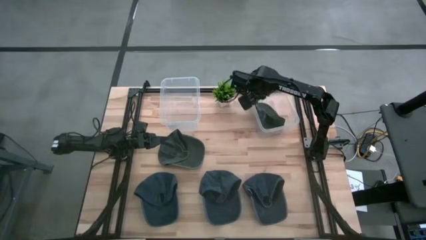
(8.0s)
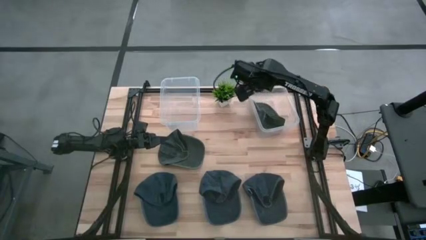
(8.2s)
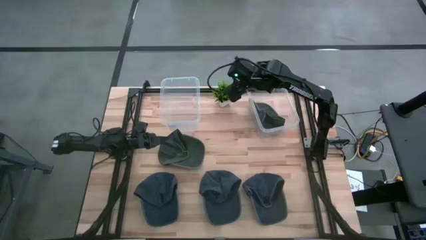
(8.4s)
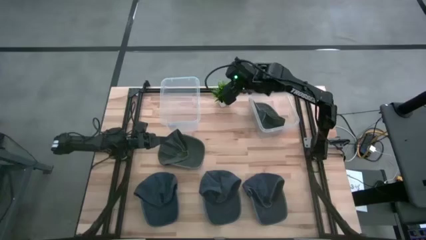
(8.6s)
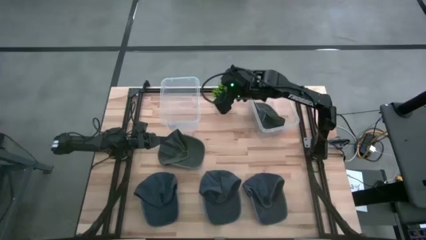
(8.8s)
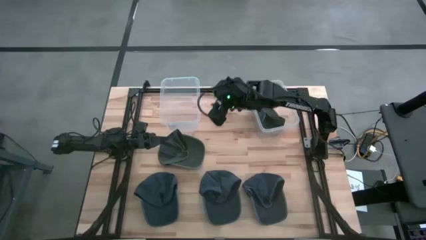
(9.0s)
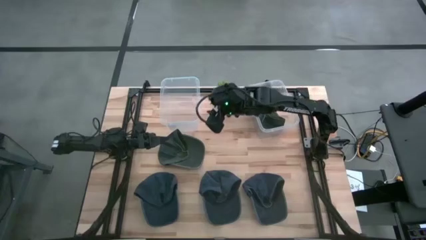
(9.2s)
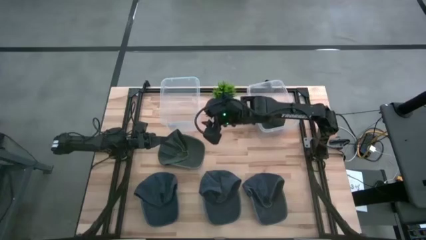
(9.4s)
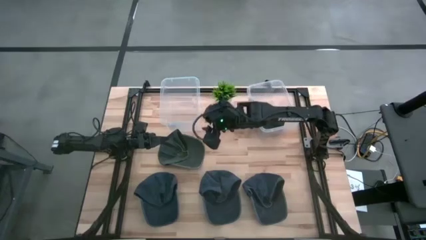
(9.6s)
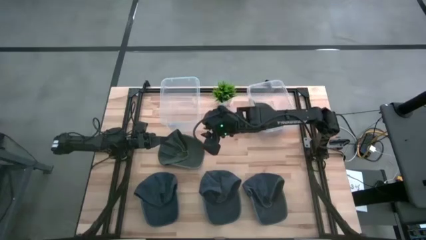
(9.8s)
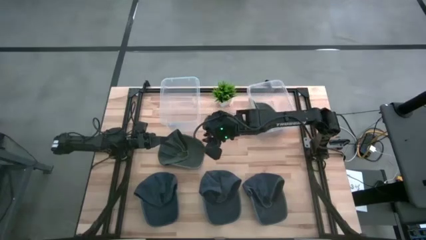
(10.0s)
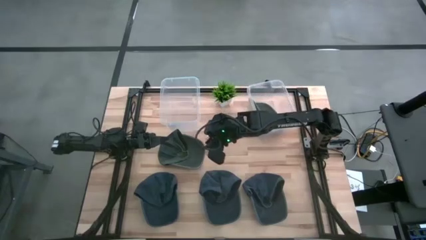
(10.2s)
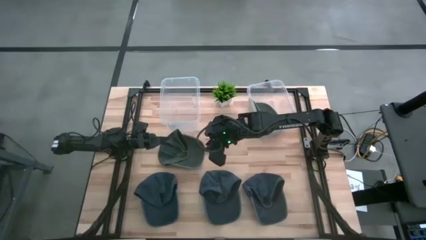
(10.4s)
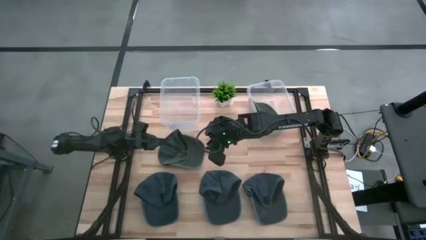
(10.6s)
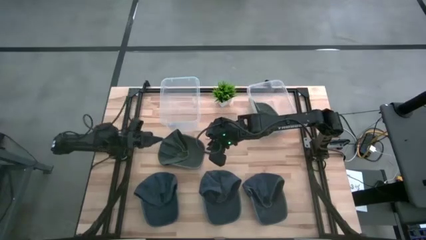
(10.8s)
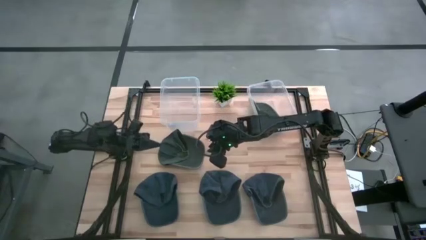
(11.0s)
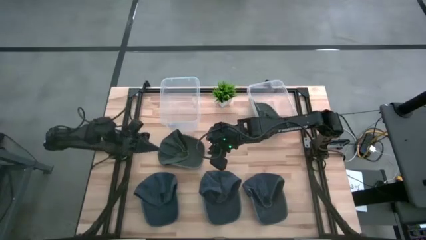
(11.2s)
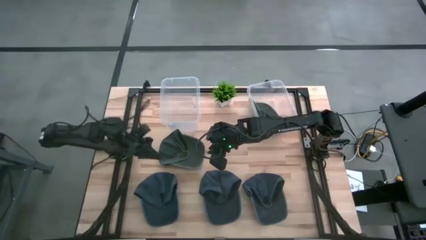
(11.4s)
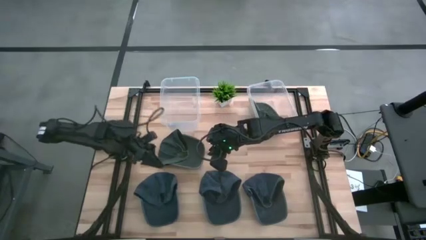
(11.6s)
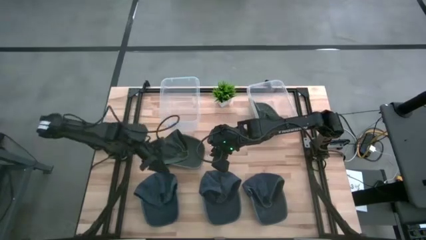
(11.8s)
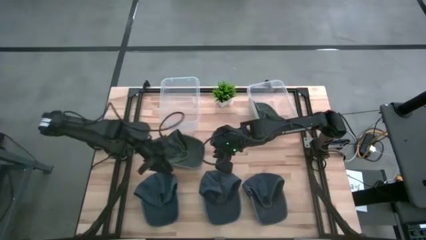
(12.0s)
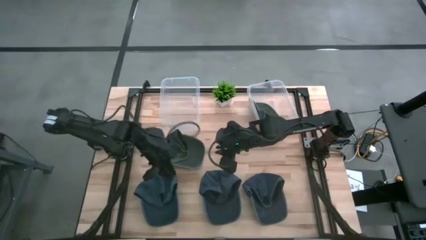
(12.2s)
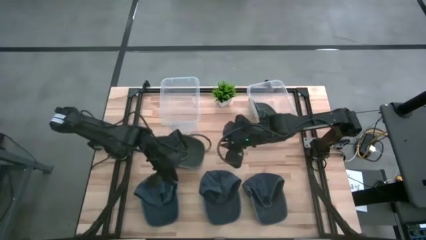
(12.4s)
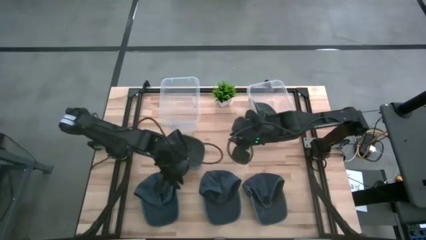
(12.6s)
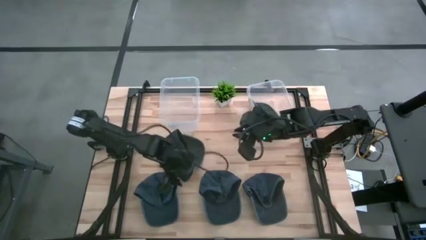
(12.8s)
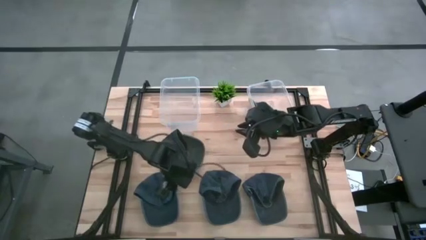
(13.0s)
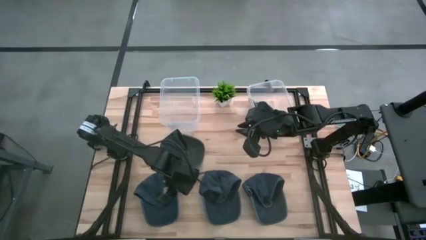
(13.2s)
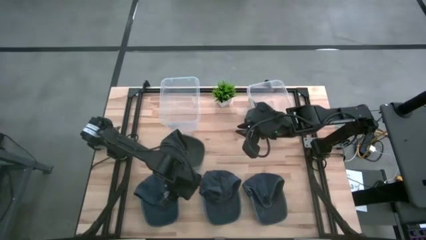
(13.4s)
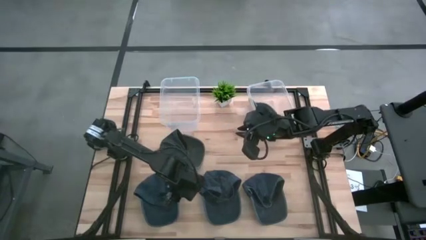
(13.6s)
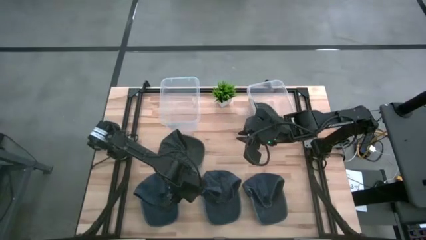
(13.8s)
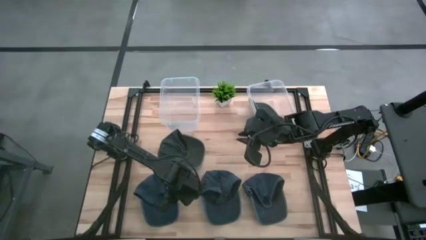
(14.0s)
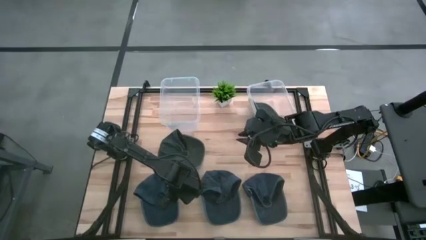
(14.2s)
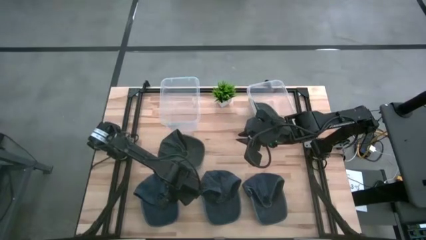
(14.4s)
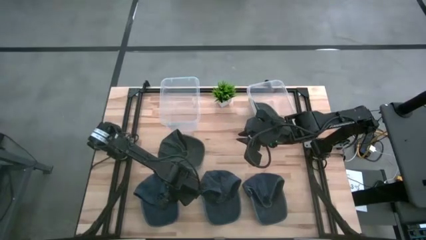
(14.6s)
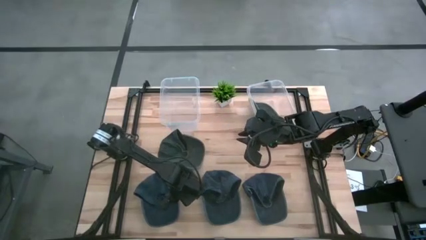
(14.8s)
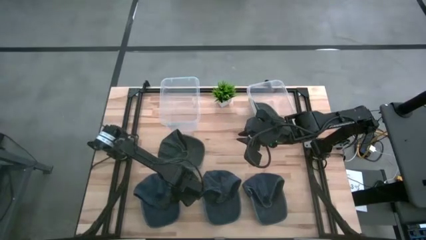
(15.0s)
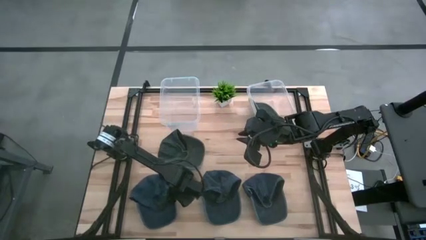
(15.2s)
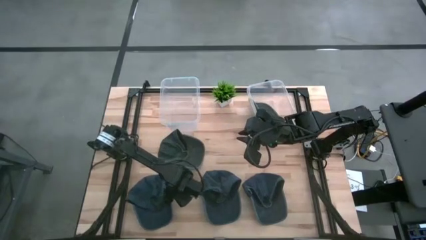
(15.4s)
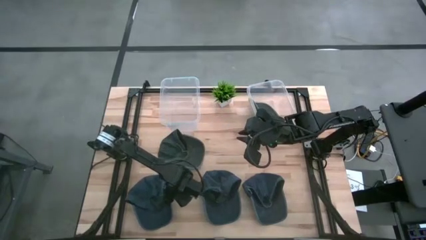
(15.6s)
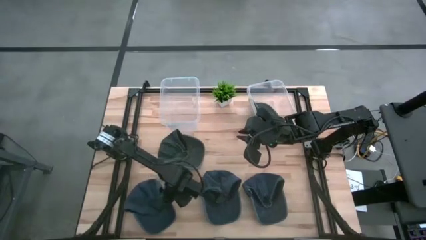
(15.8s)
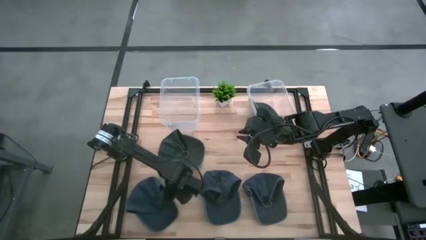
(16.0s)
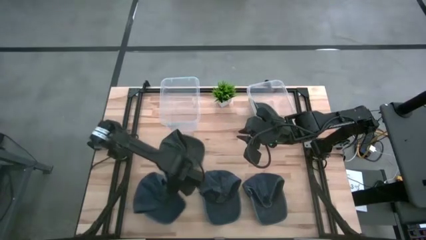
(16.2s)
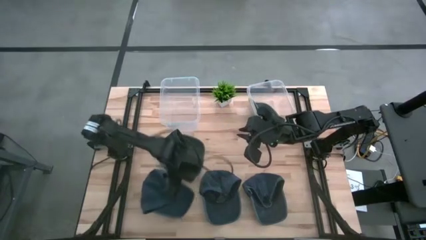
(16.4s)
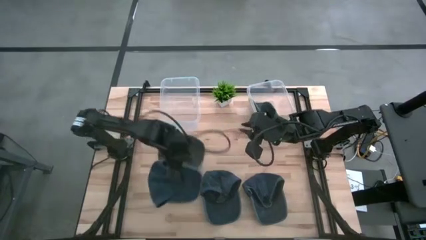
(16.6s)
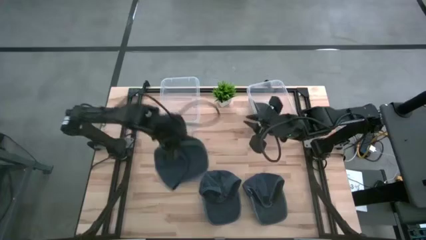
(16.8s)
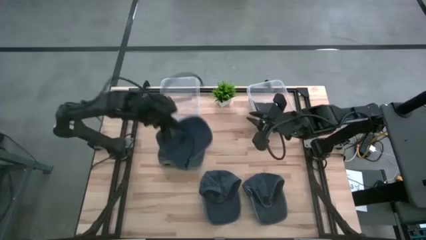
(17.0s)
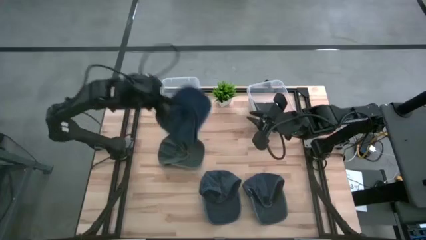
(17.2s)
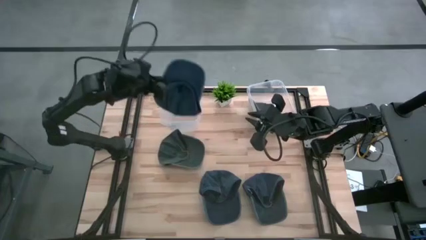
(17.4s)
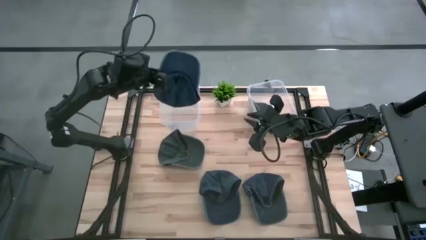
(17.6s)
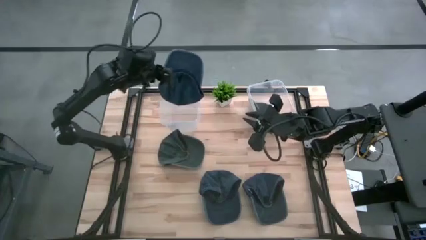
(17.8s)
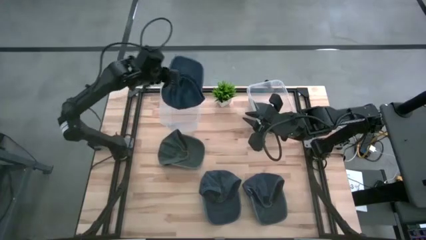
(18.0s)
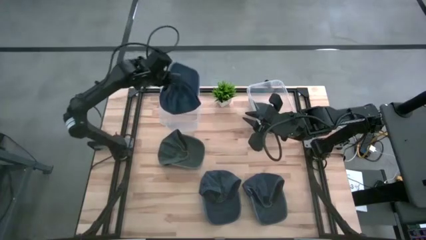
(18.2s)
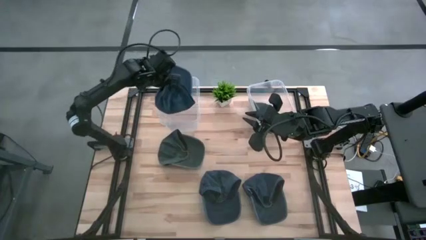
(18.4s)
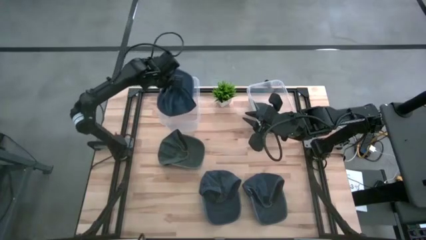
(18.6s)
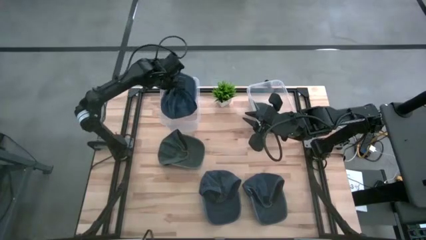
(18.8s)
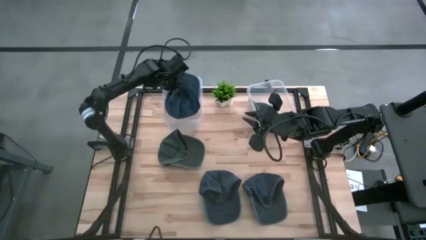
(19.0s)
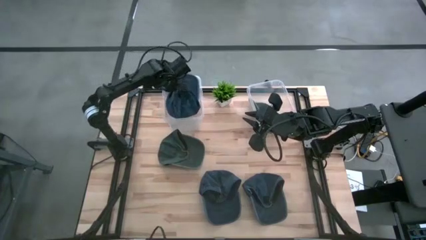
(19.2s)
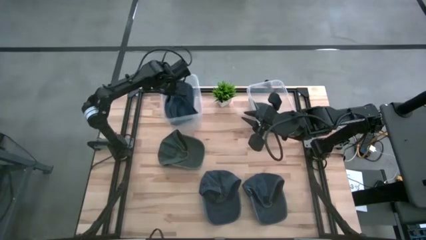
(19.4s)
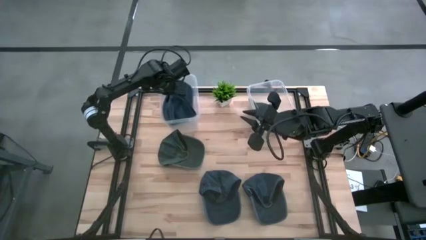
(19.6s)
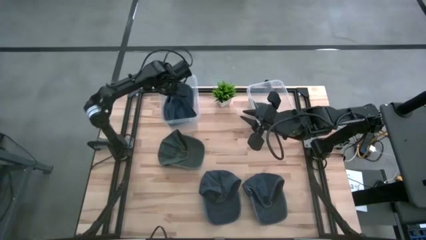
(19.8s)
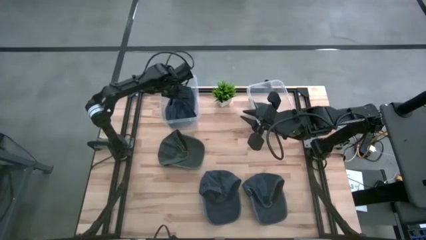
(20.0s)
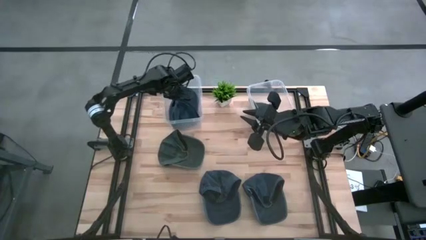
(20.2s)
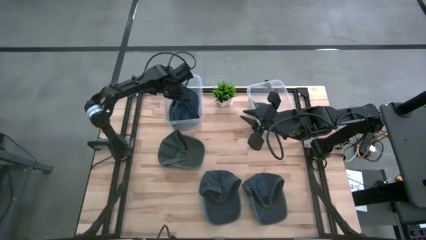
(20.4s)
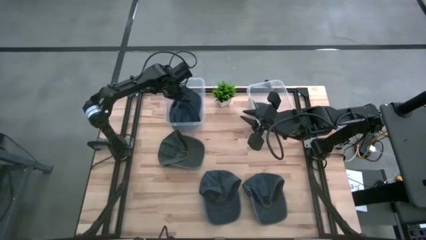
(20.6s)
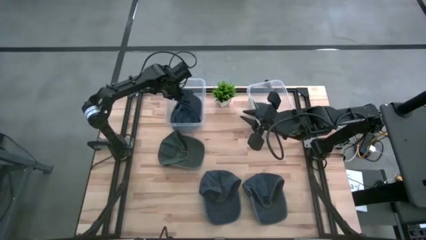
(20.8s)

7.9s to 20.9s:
Task: Pick & Place hat
Put the left blue cap into the left transparent bin
